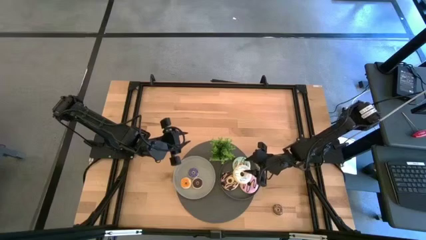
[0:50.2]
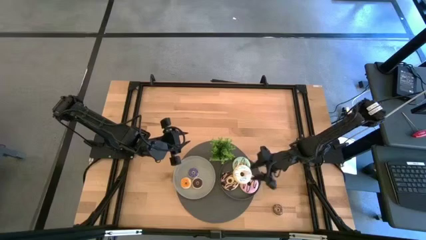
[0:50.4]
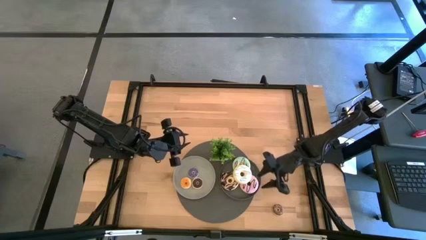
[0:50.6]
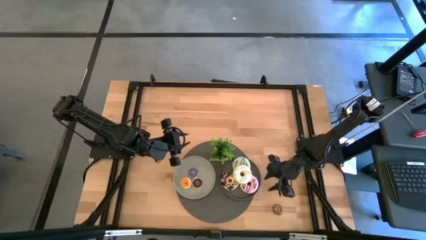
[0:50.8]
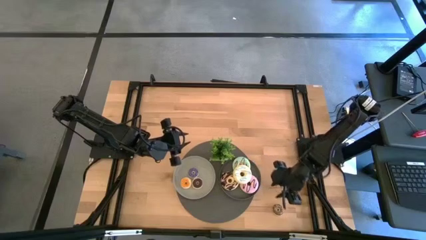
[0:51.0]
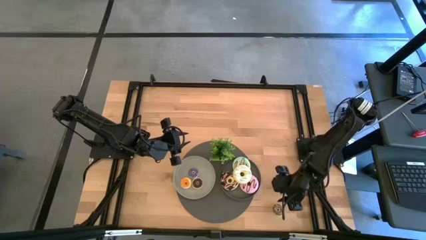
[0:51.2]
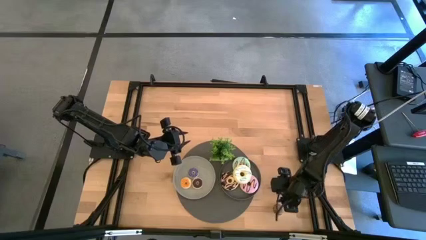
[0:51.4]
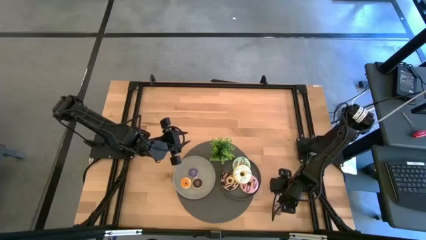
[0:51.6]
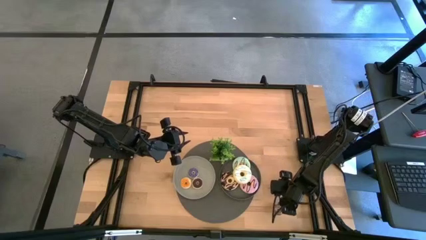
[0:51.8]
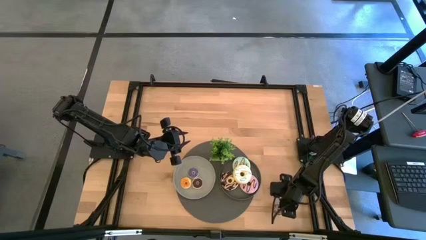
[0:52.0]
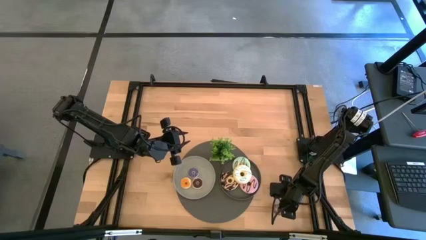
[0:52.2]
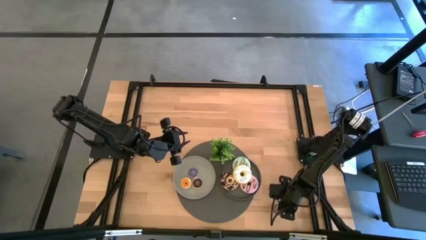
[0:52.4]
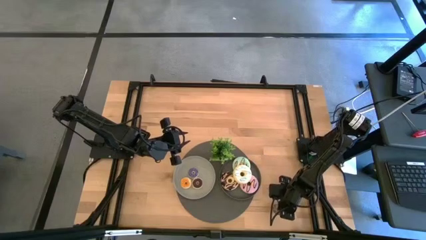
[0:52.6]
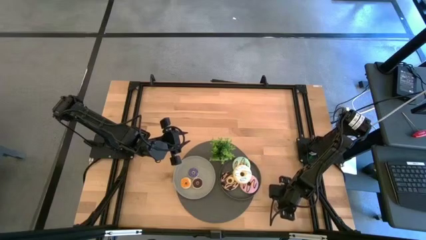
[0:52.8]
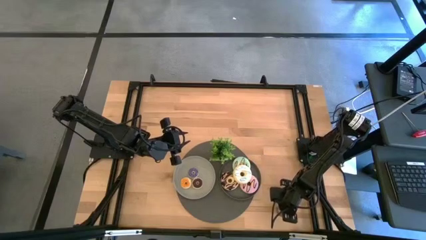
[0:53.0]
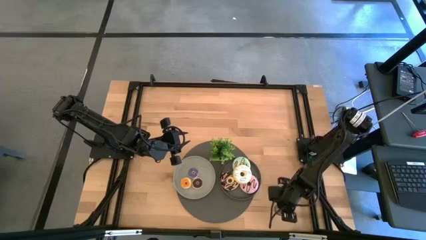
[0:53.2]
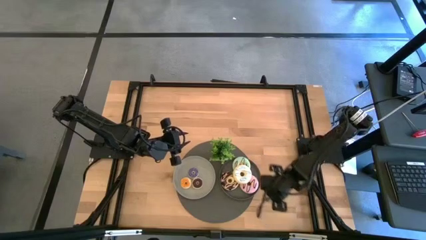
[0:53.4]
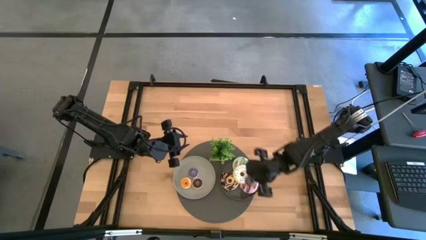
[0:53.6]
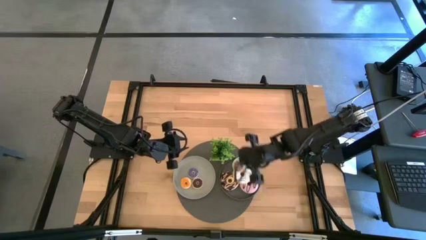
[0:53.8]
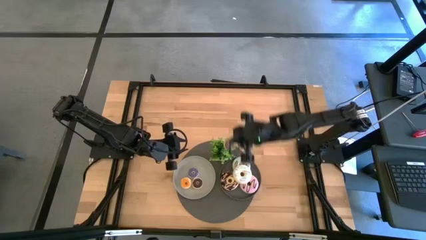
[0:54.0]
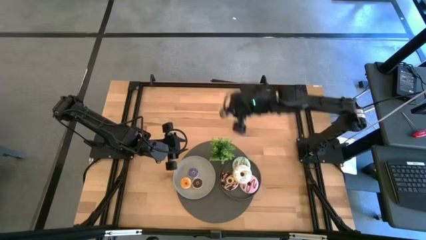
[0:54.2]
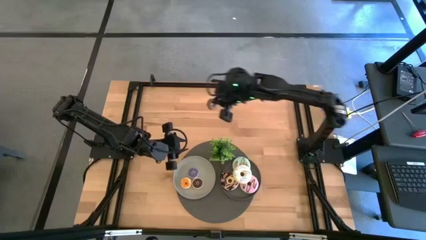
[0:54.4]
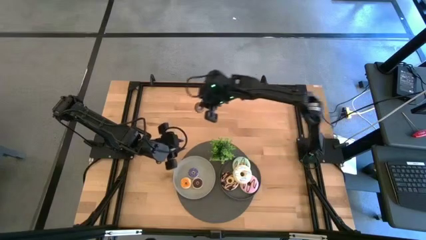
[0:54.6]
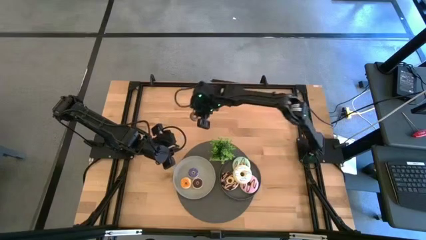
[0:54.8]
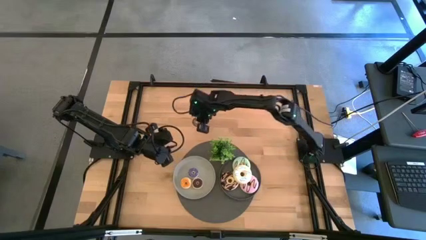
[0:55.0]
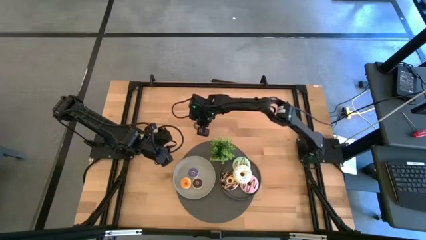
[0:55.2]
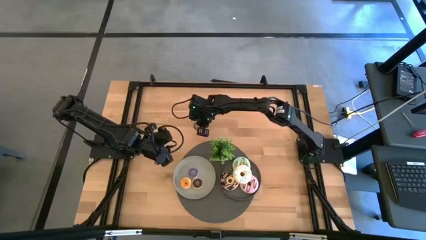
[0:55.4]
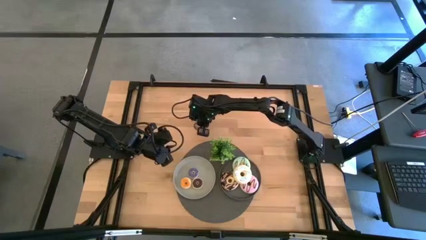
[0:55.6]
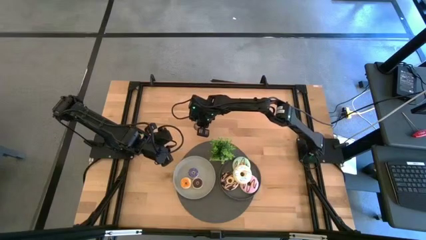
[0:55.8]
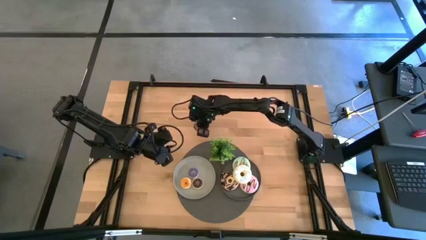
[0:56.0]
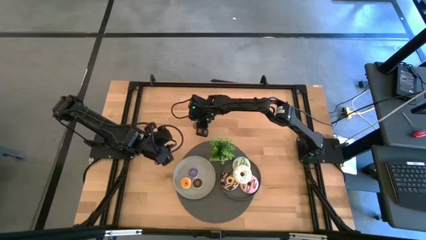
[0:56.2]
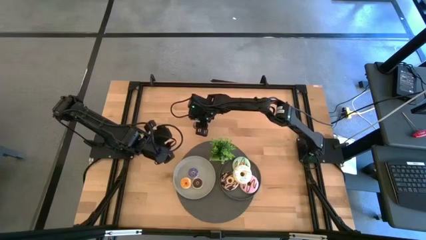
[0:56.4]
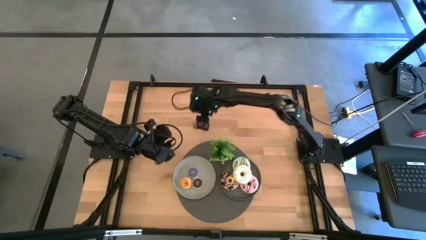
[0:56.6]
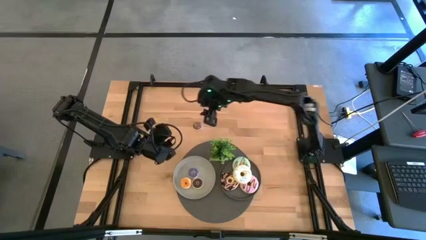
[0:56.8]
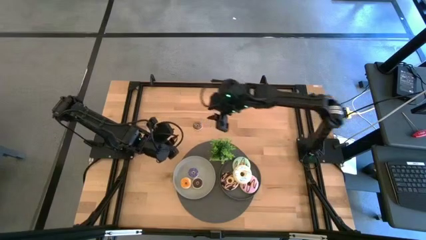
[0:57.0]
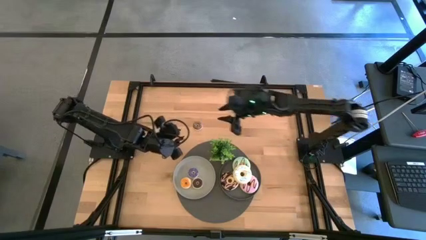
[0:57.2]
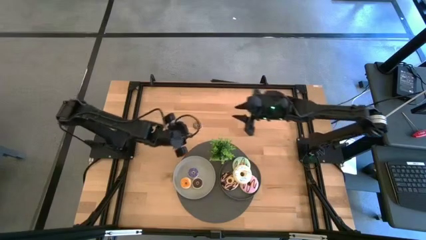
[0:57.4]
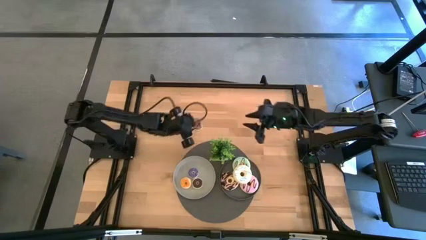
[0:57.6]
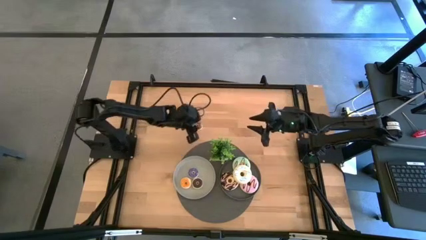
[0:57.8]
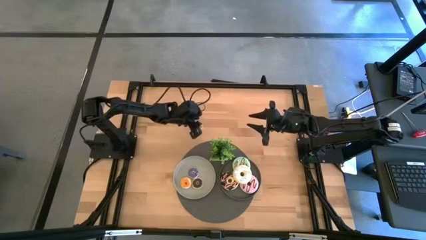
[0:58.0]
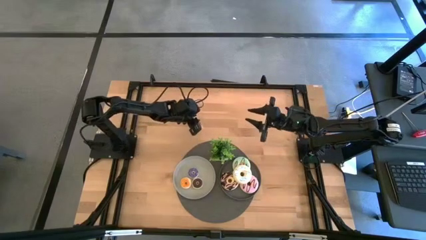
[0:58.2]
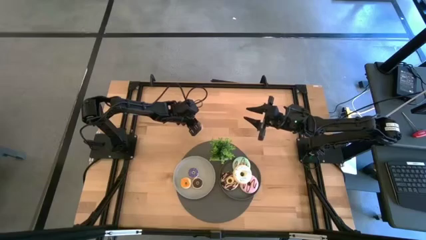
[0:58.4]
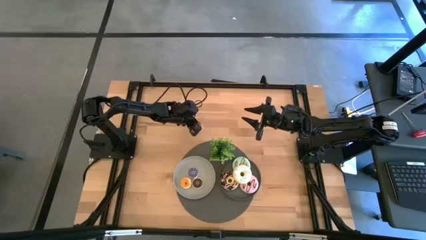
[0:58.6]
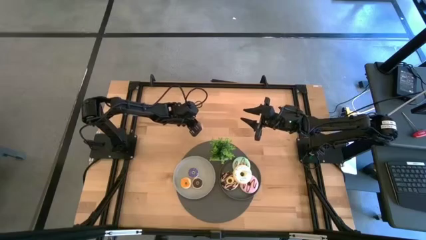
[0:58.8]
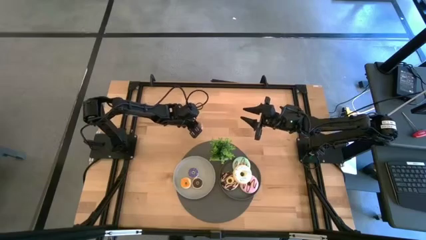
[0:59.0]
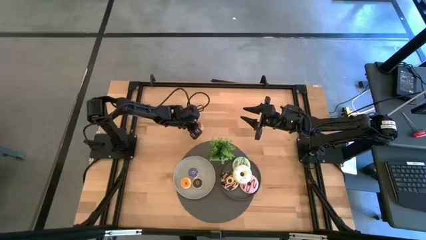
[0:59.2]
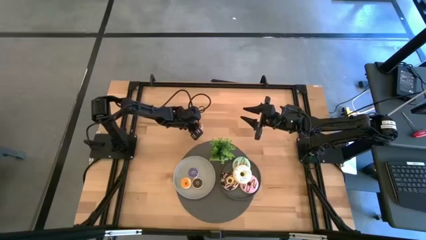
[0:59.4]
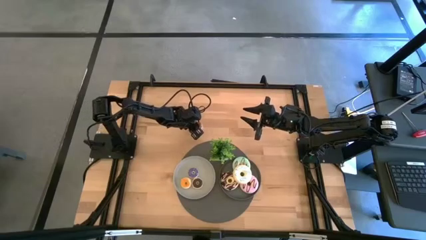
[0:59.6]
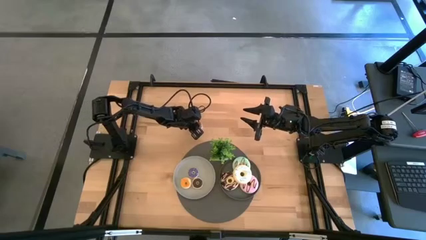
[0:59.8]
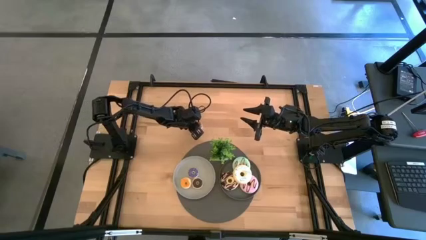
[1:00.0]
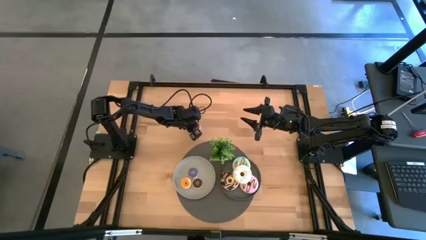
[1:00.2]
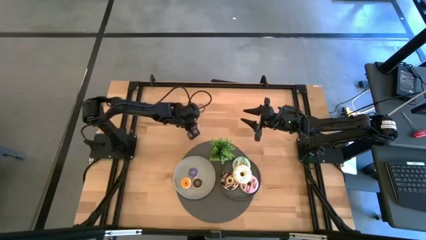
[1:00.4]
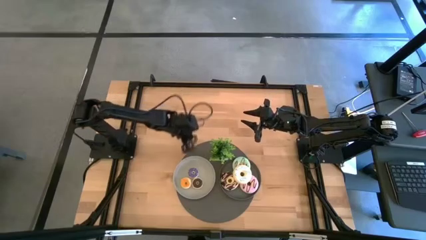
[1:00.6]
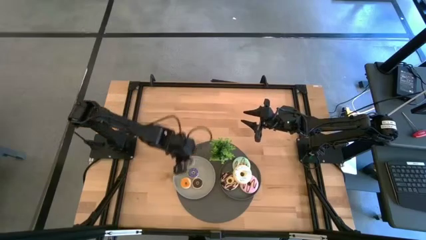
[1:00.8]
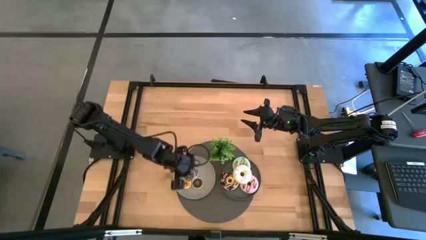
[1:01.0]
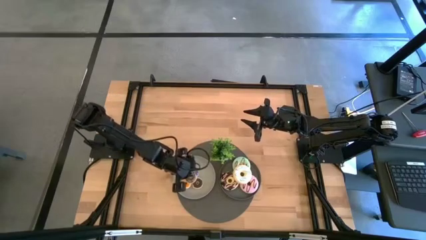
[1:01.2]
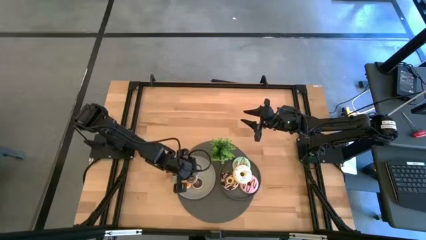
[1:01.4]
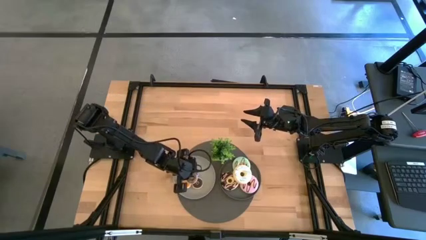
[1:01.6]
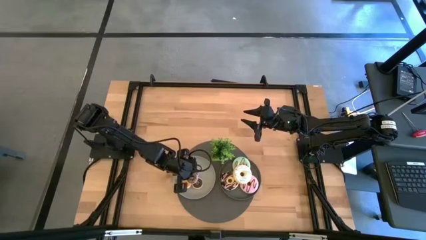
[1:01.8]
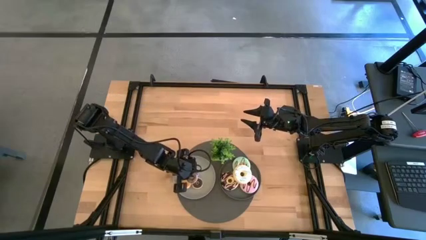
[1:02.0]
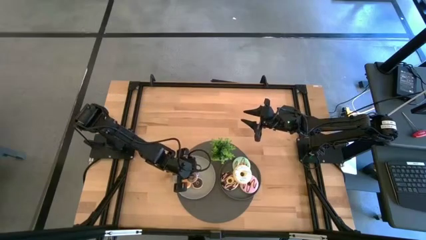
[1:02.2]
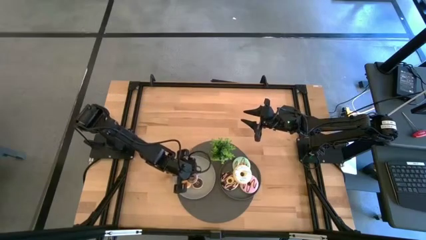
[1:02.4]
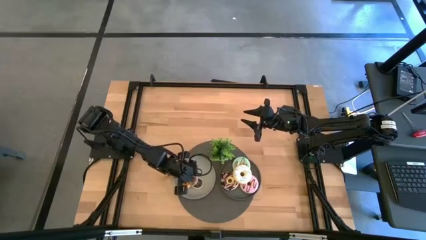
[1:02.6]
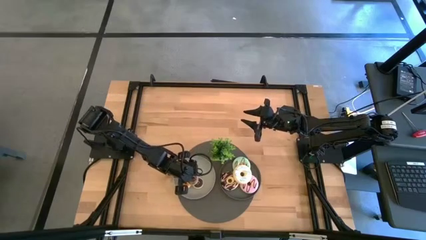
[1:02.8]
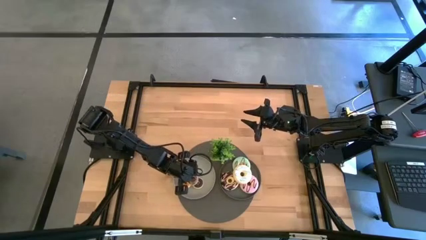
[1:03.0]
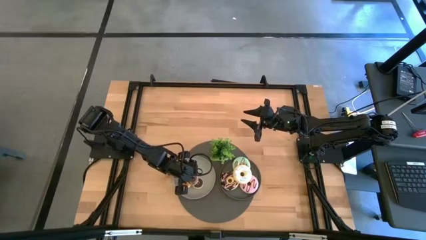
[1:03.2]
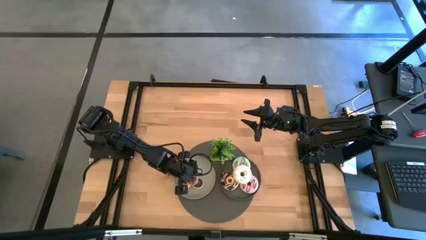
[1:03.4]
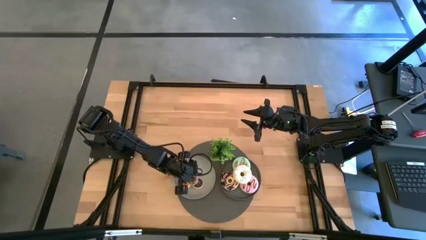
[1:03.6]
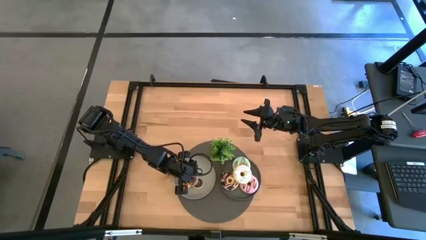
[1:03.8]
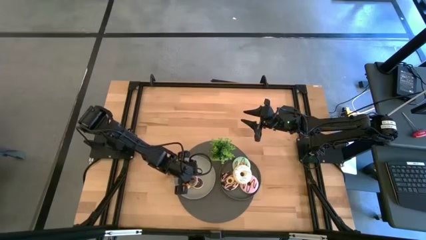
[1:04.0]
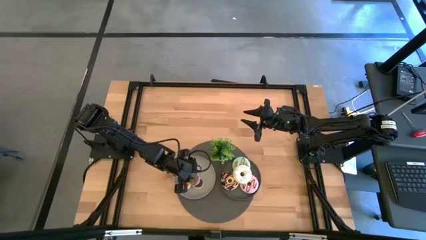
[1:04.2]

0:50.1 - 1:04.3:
Task: Pick & Place donuts
Put the small brown donut on the gray plate

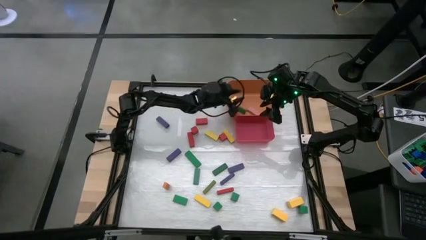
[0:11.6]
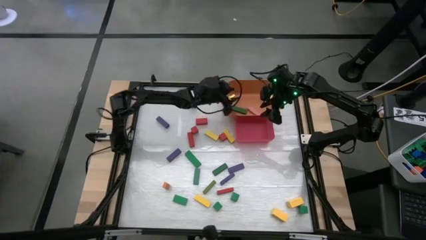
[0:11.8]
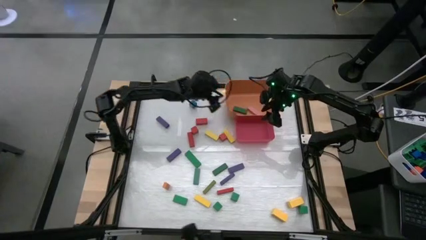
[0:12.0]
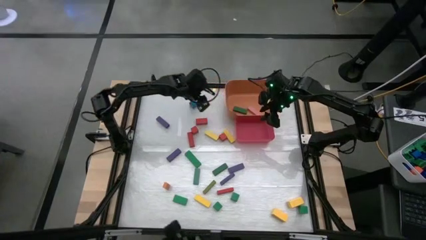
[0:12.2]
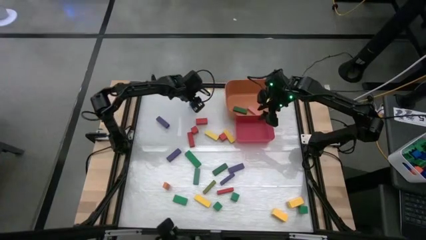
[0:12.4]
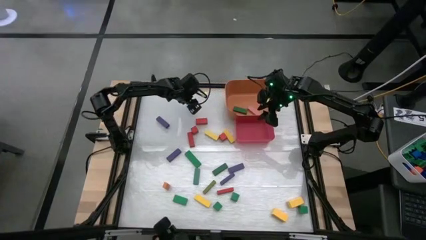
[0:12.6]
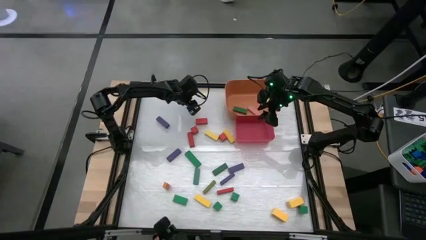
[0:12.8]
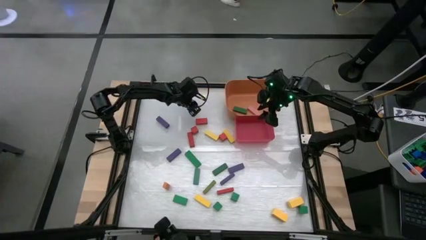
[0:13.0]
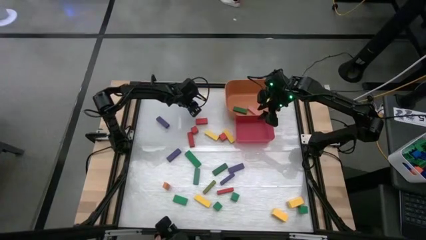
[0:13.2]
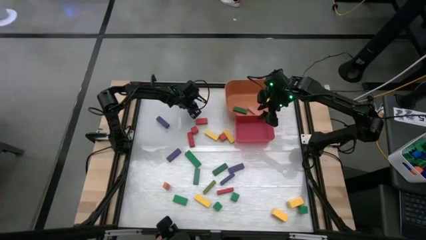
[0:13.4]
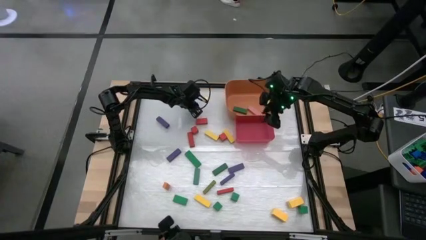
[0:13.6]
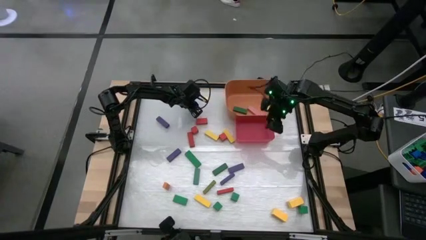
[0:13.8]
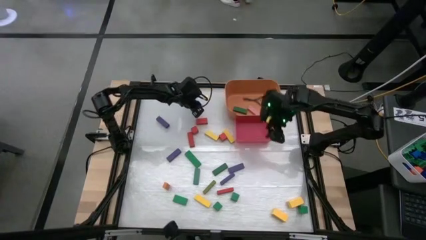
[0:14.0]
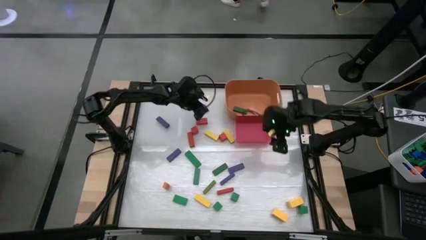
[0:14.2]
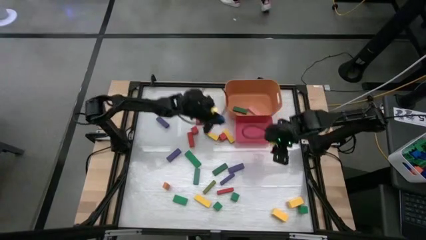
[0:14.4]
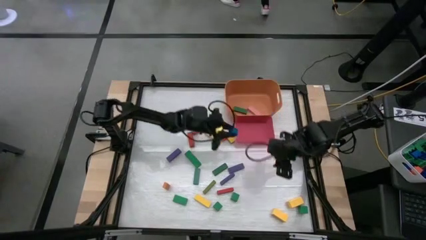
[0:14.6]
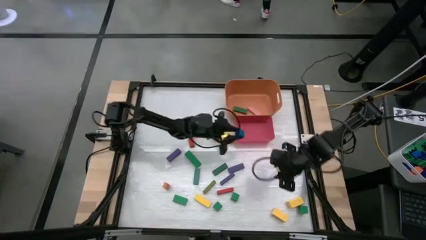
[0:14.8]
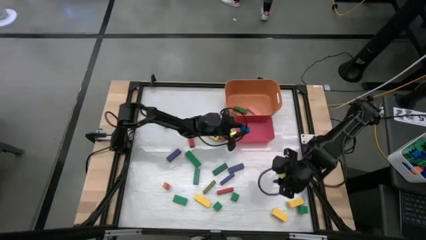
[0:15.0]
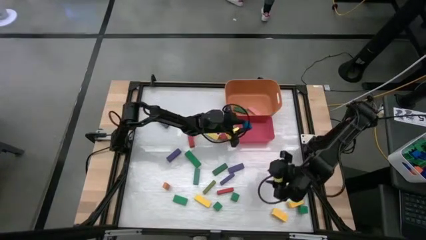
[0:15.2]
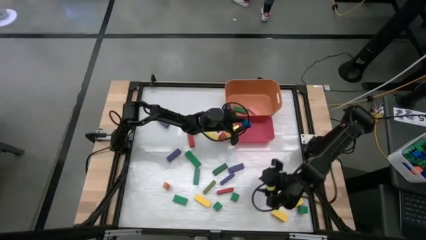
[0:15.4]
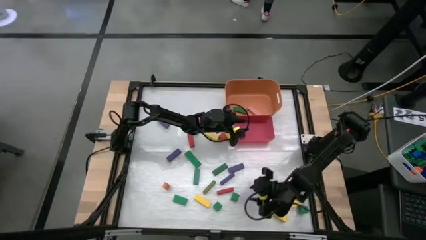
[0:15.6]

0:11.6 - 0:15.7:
Task: Sort blocks by size
Put the blue square block into the red bin
